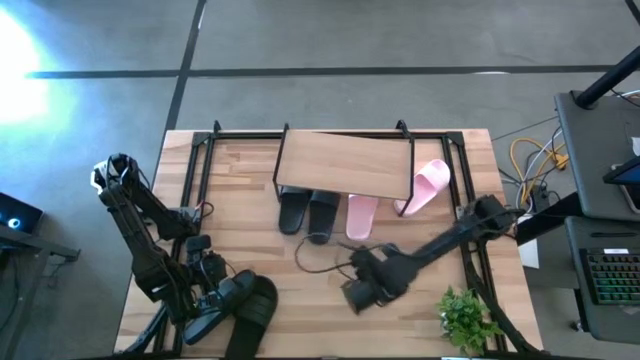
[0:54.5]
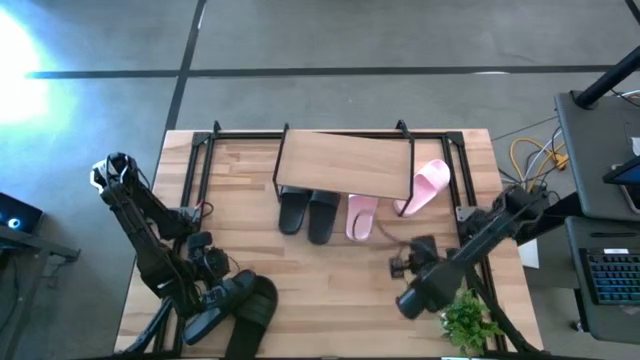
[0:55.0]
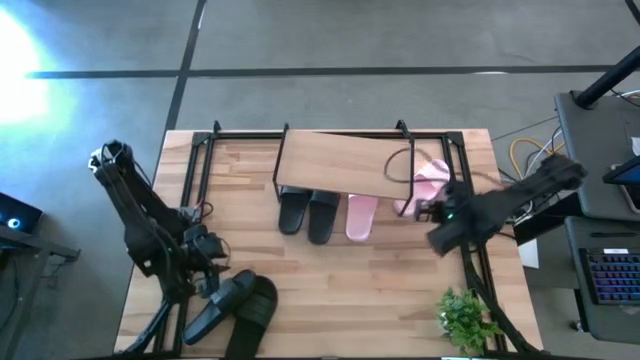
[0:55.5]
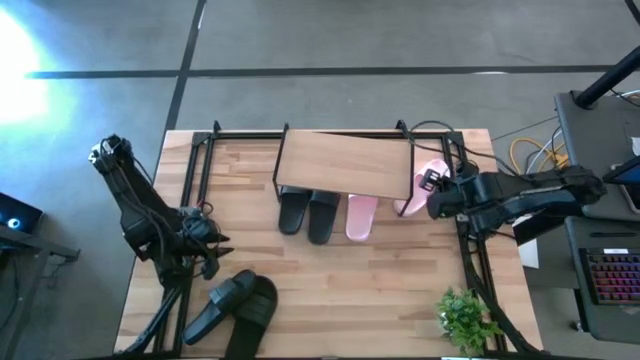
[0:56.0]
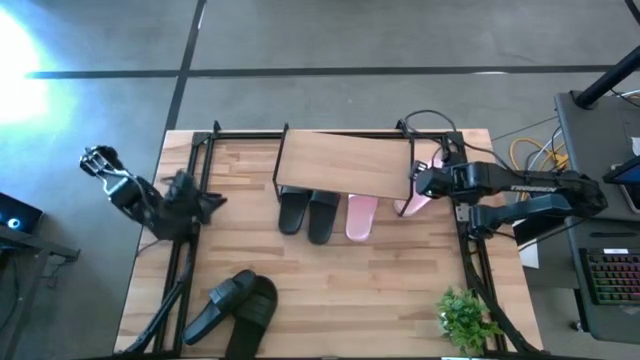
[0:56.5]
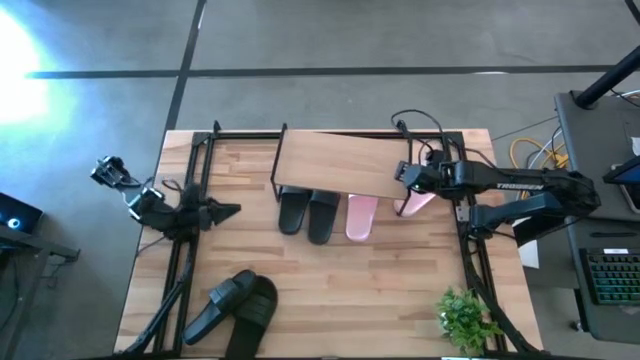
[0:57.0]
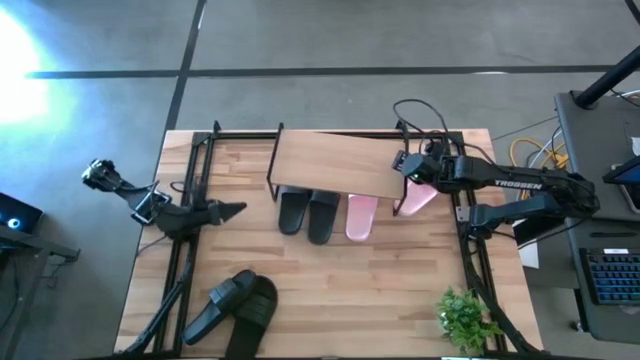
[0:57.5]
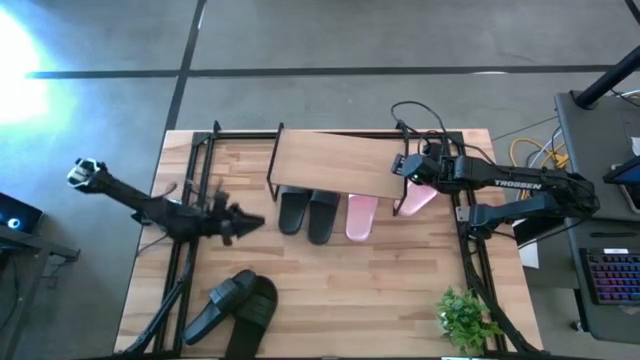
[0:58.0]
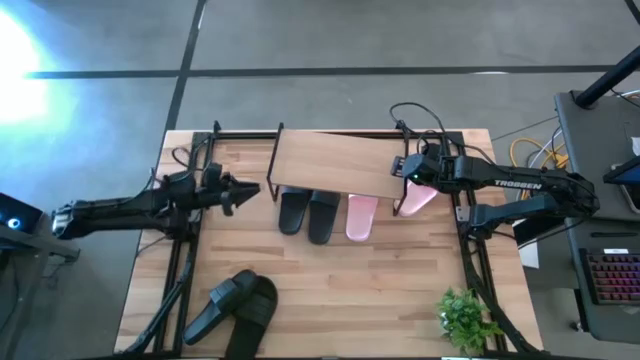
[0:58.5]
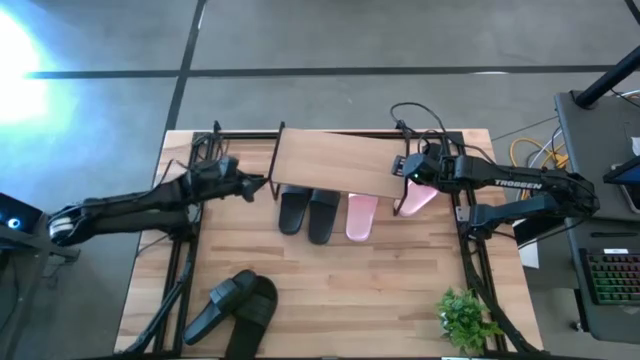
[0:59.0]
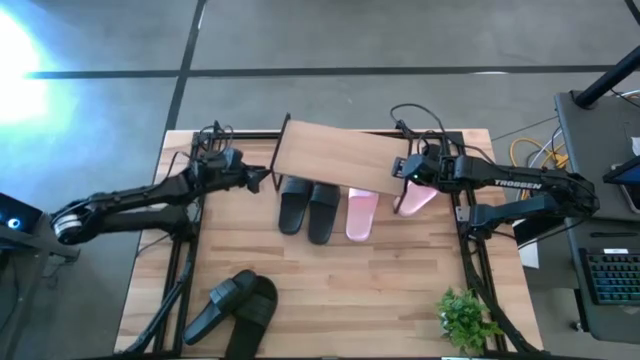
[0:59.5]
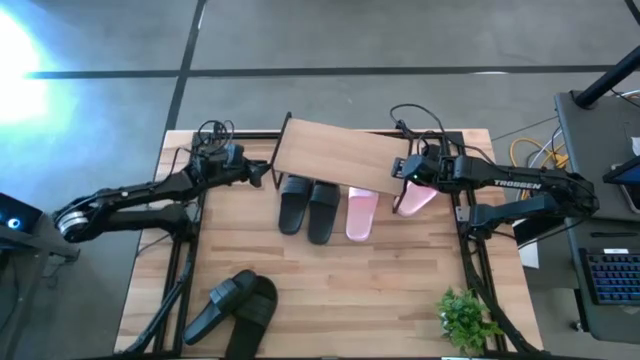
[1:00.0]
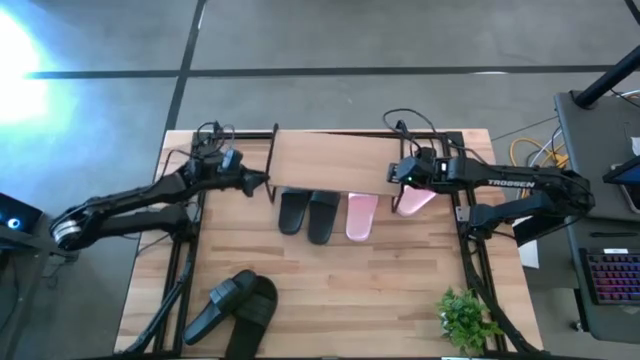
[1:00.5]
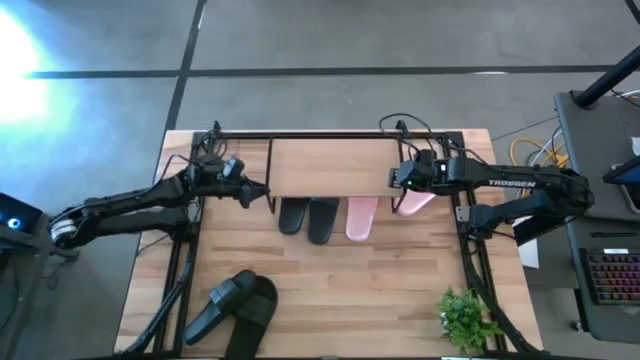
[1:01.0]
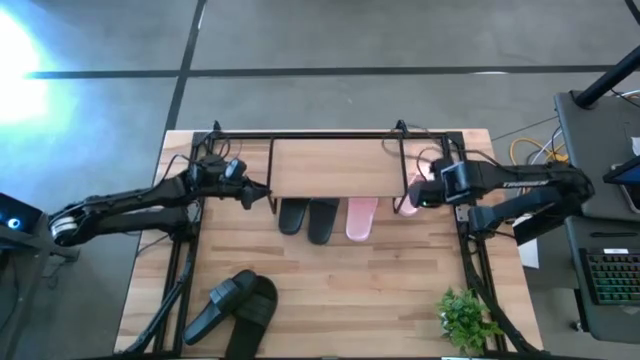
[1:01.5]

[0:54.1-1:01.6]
Task: Pick and place slides into the shelf
Adjust the shelf

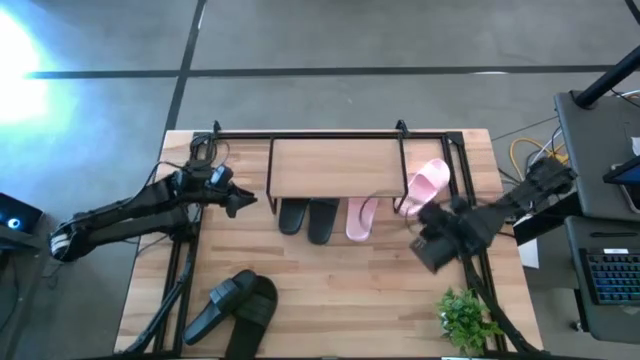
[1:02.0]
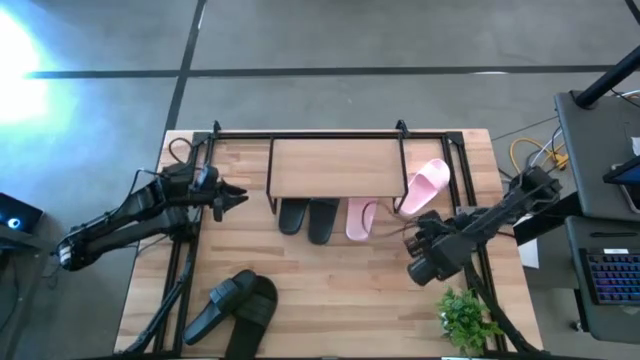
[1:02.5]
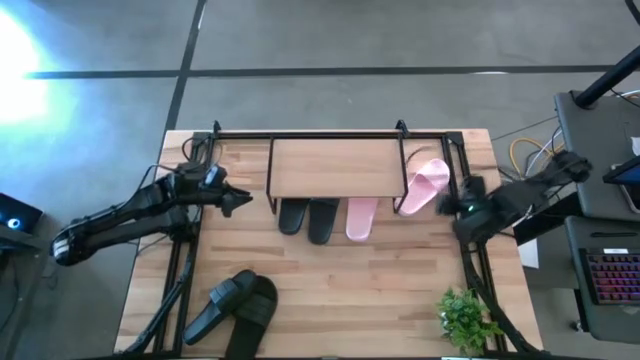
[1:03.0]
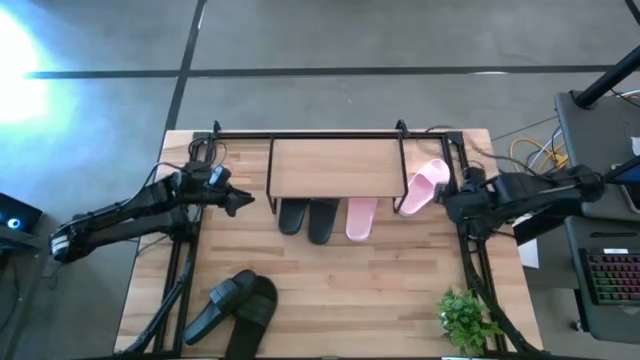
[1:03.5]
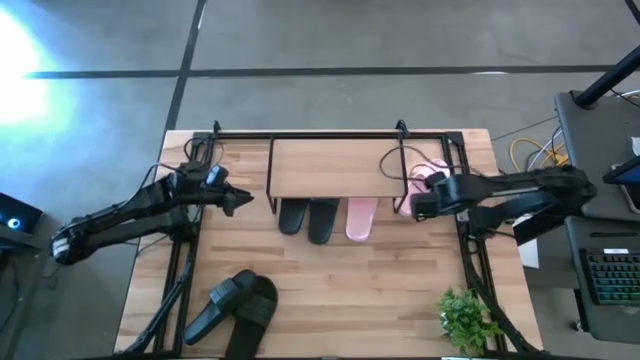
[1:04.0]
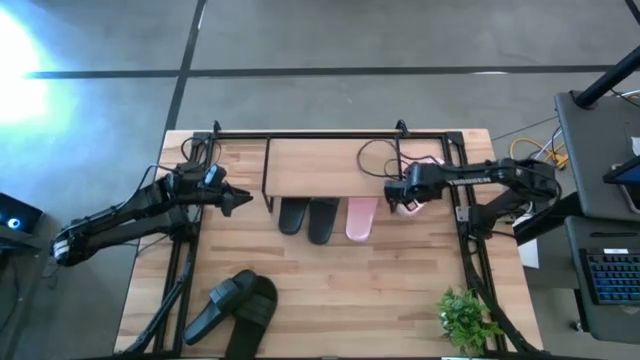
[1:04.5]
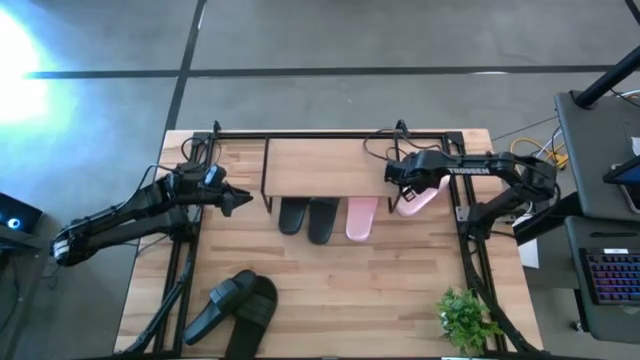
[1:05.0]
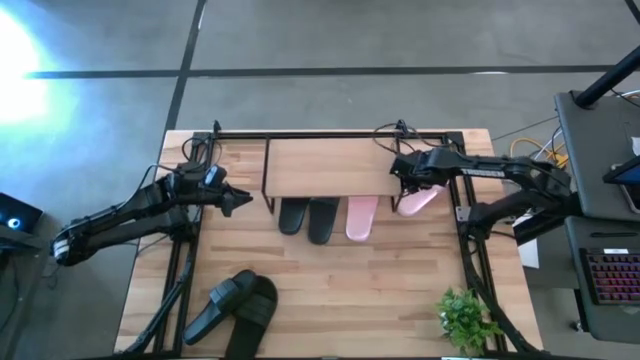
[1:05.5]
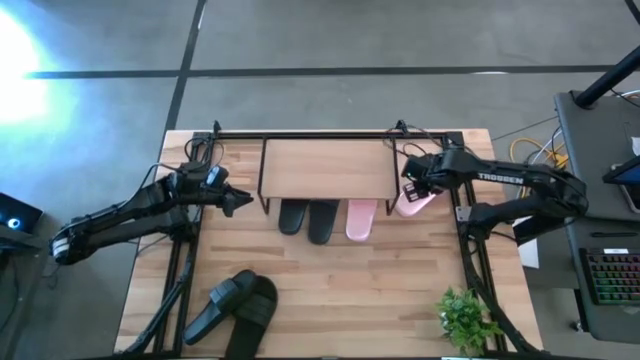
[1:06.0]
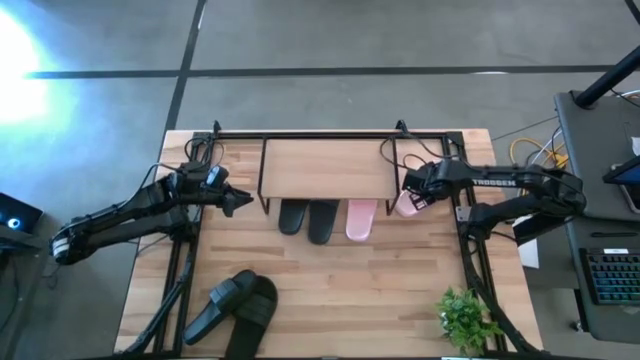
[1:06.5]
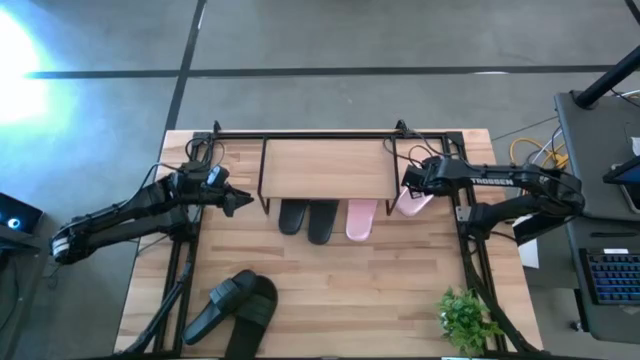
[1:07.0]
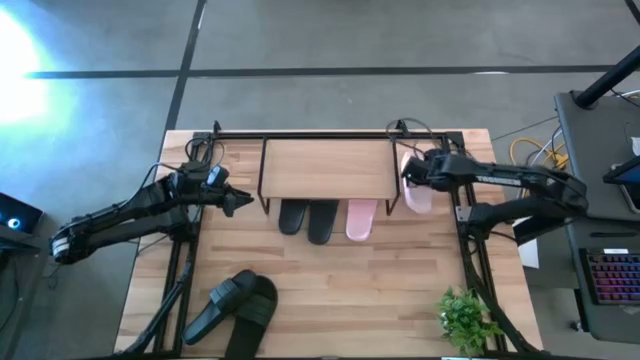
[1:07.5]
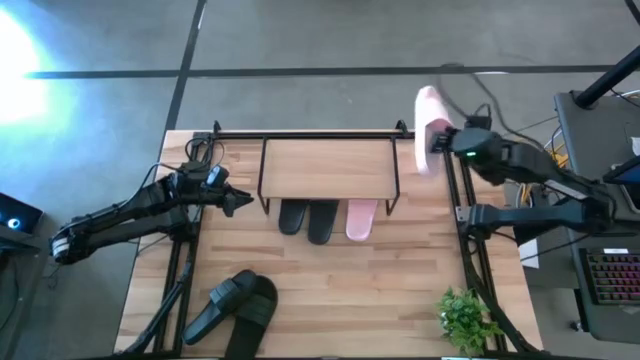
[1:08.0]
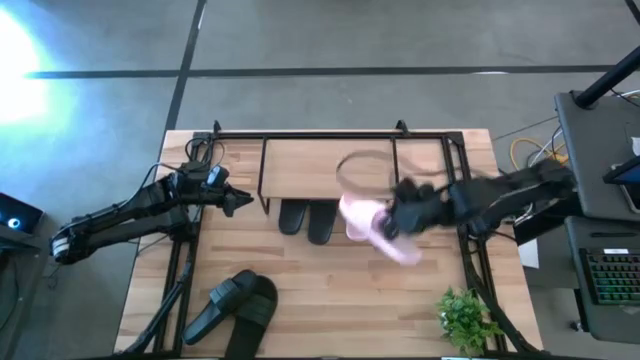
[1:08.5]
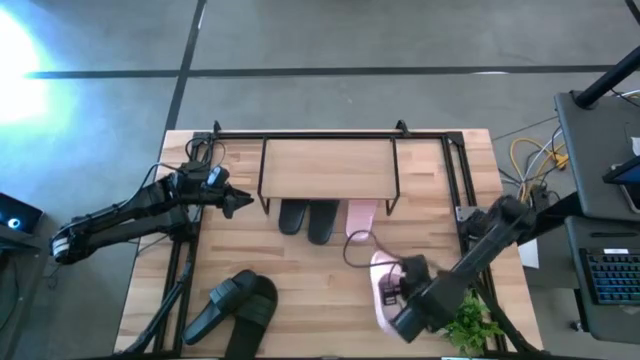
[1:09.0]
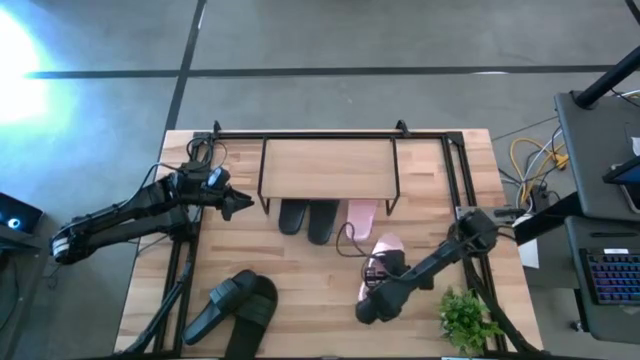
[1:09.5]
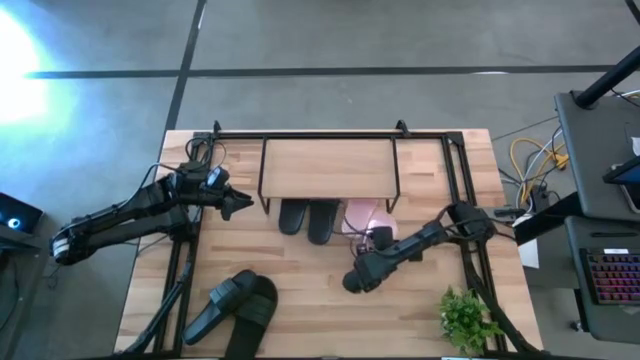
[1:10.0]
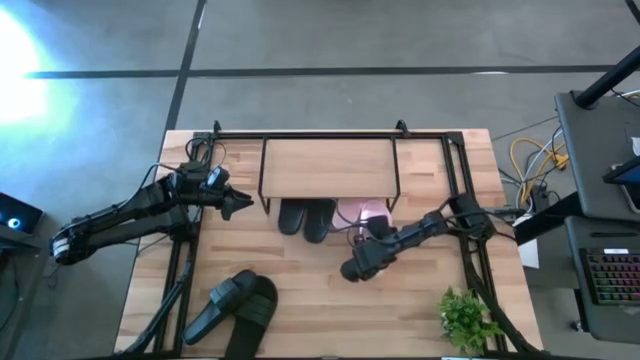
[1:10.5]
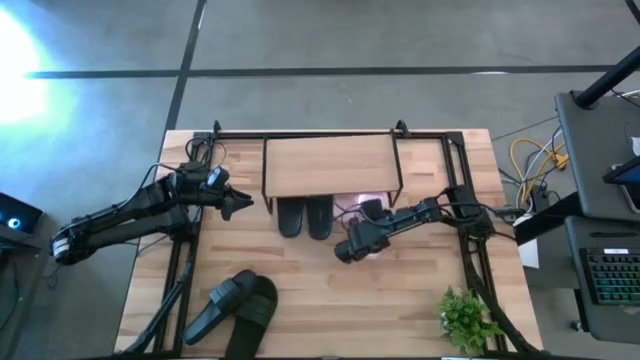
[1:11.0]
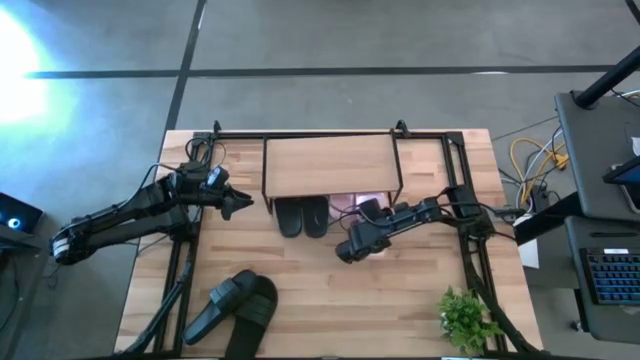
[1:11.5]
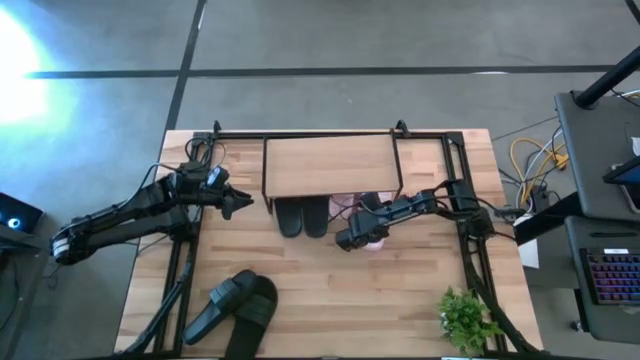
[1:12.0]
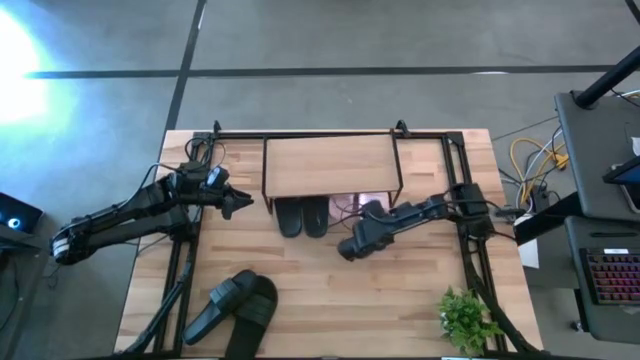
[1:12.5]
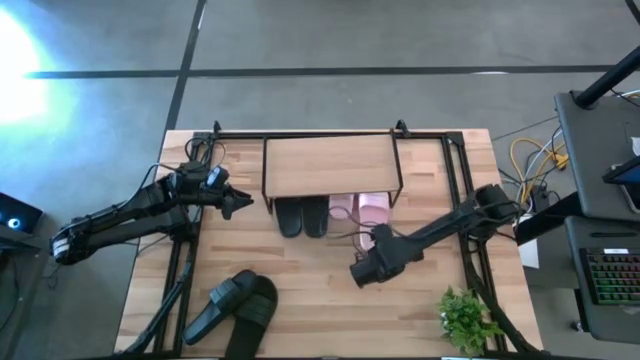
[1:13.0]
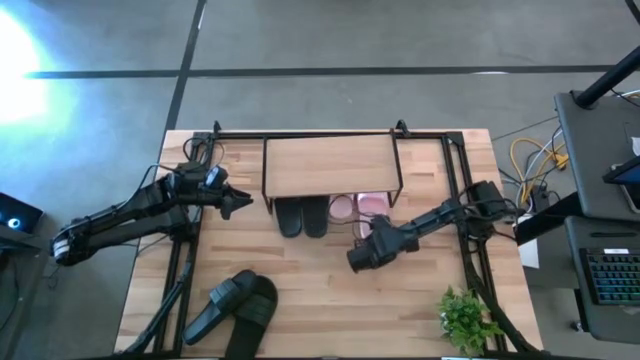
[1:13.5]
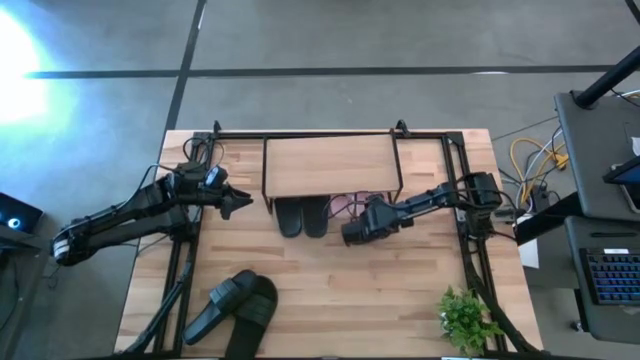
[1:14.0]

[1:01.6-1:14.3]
Put the pink slides under the shelf

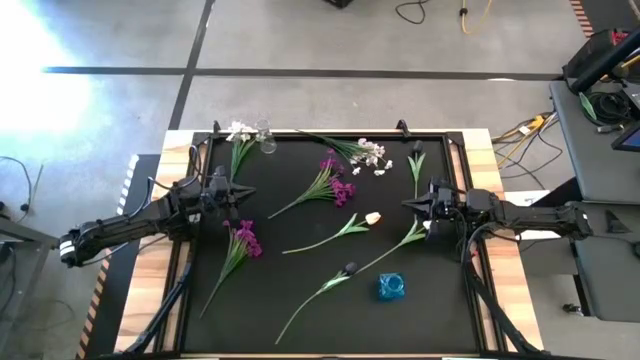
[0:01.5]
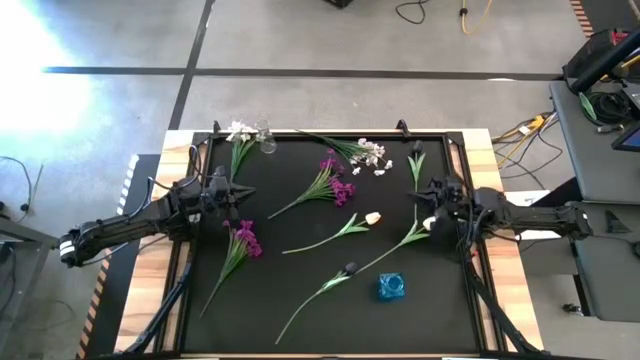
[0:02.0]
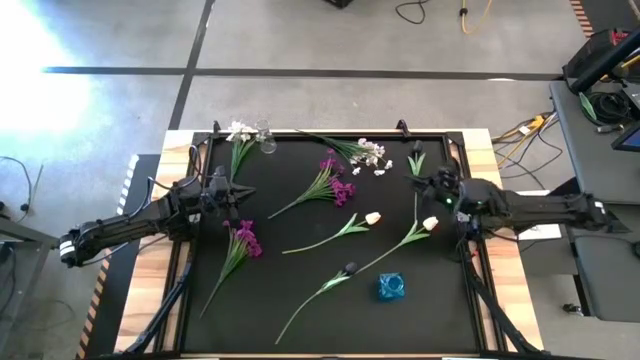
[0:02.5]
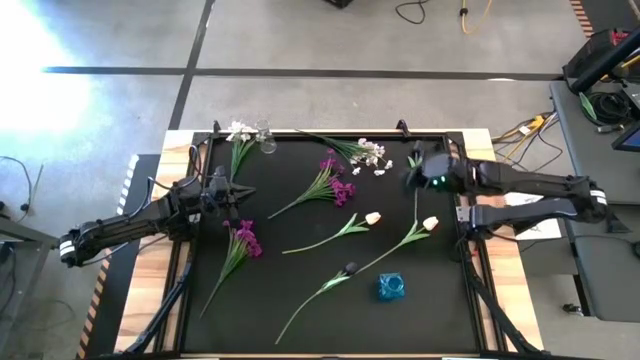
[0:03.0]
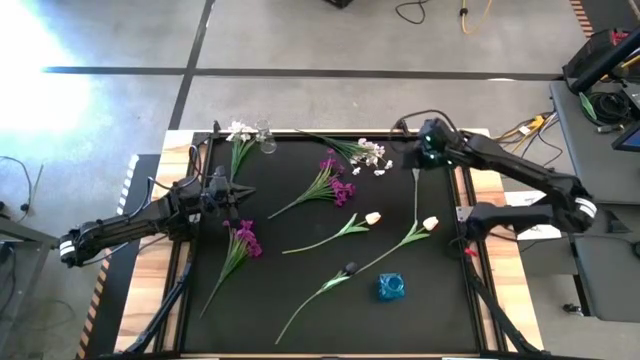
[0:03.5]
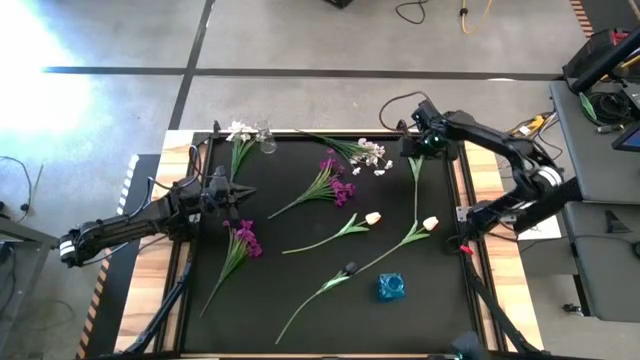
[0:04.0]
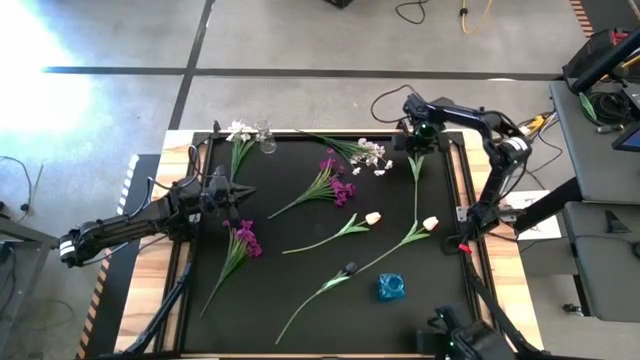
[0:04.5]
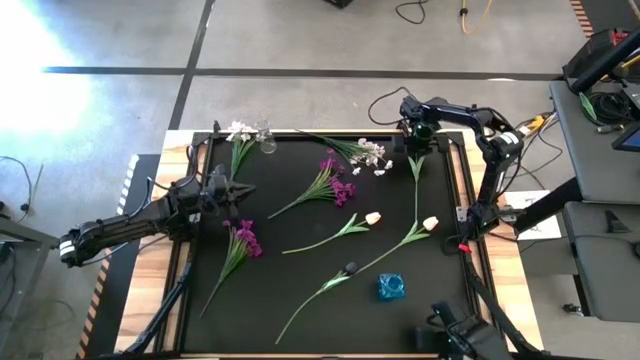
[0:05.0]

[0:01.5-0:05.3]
Task: Sort flowers into vase by color
Put the top black tulip into the transparent vase
